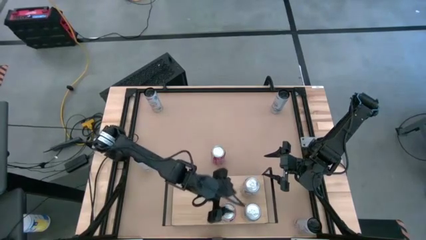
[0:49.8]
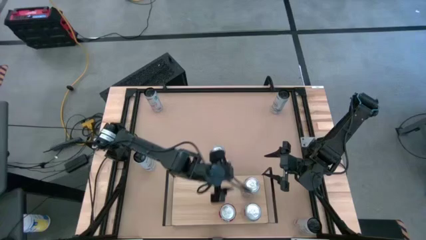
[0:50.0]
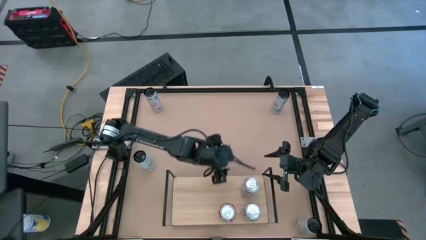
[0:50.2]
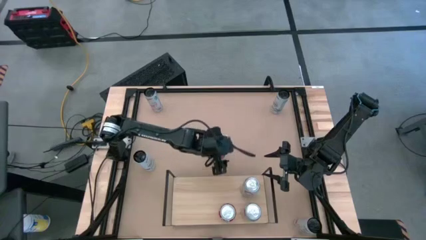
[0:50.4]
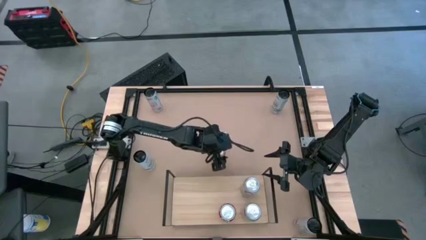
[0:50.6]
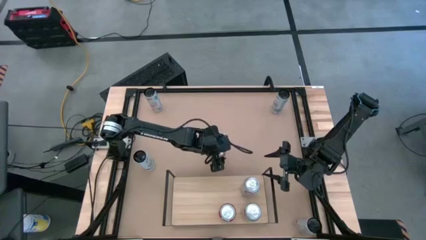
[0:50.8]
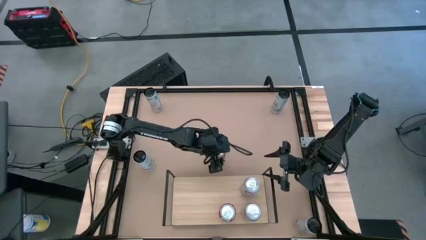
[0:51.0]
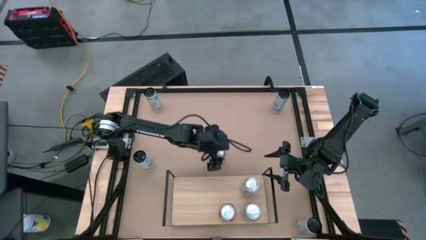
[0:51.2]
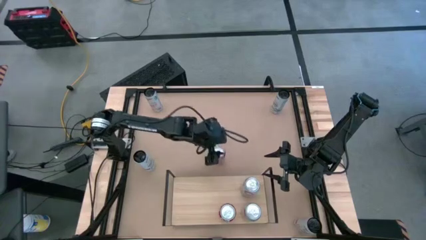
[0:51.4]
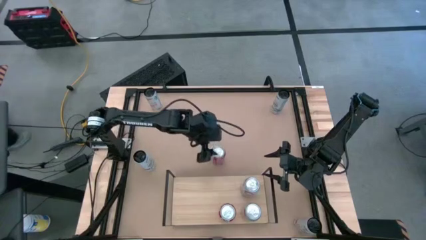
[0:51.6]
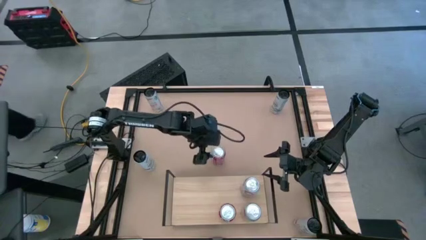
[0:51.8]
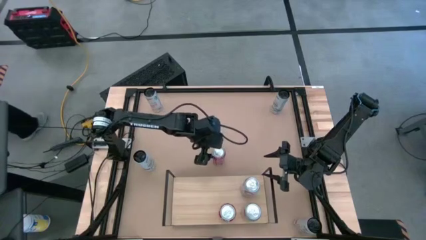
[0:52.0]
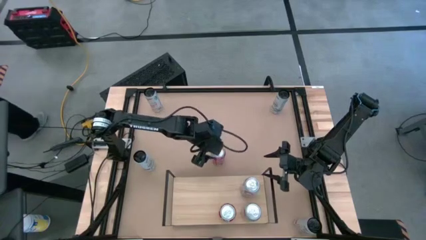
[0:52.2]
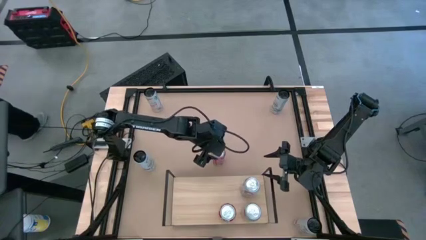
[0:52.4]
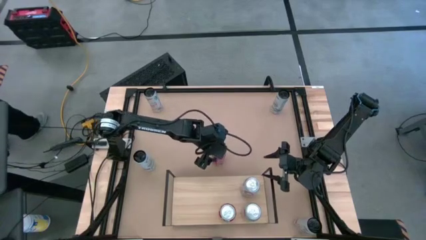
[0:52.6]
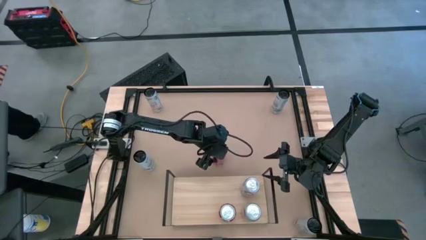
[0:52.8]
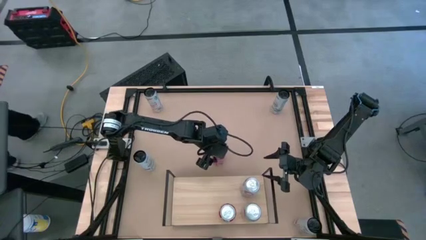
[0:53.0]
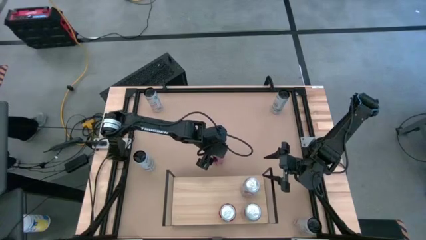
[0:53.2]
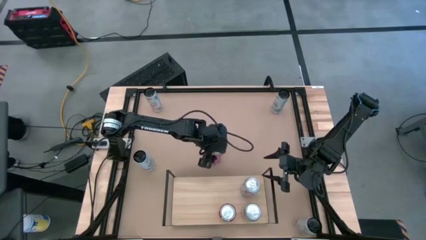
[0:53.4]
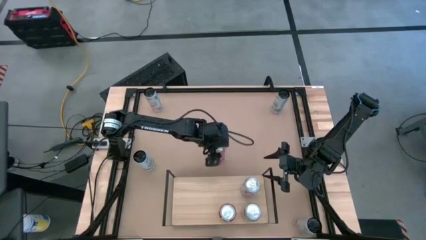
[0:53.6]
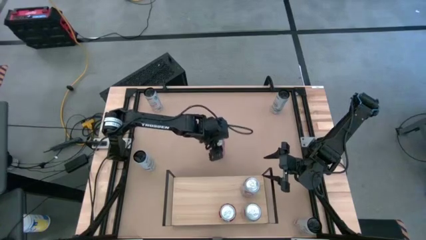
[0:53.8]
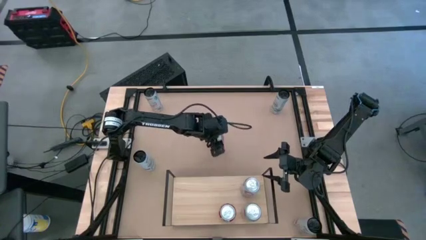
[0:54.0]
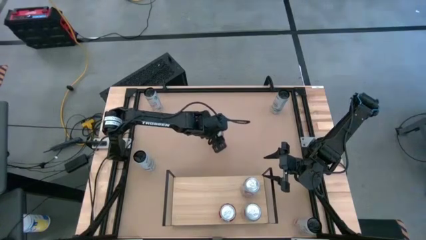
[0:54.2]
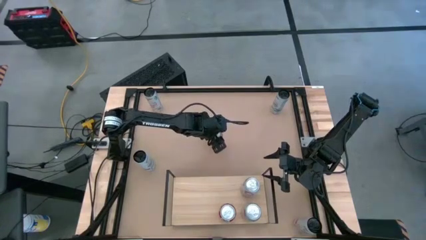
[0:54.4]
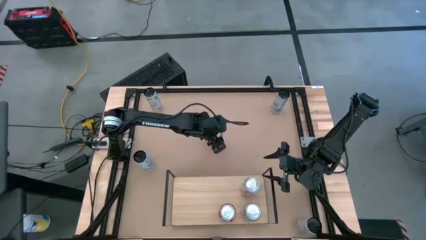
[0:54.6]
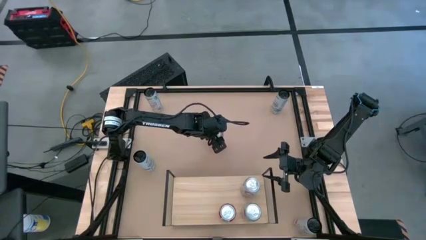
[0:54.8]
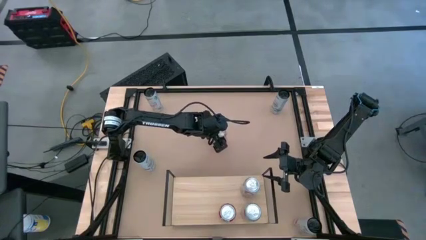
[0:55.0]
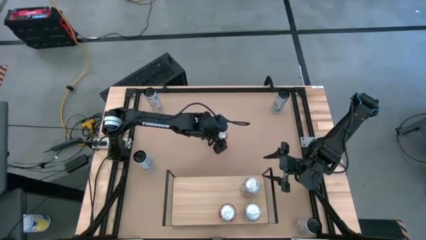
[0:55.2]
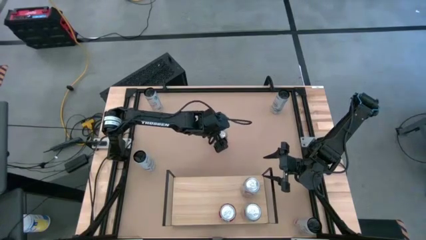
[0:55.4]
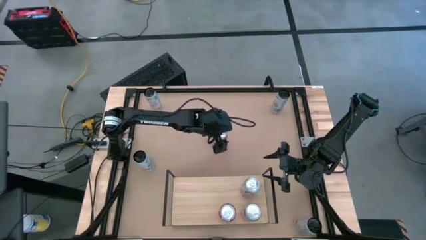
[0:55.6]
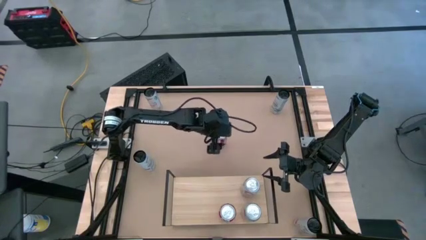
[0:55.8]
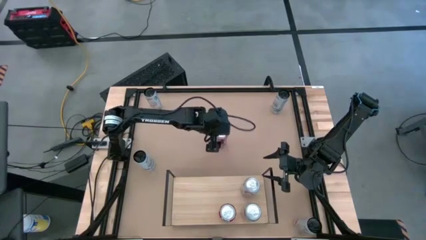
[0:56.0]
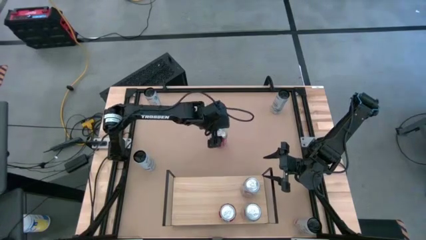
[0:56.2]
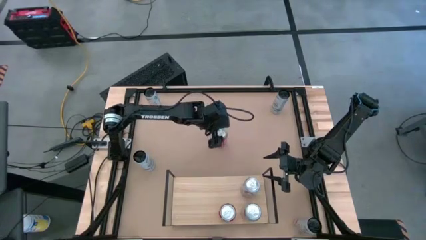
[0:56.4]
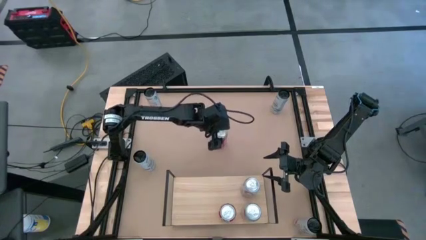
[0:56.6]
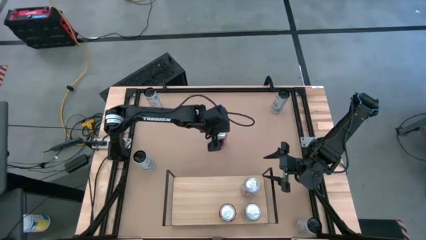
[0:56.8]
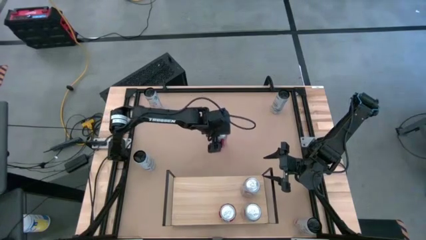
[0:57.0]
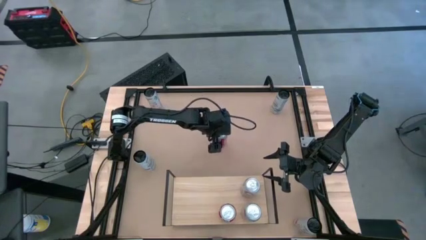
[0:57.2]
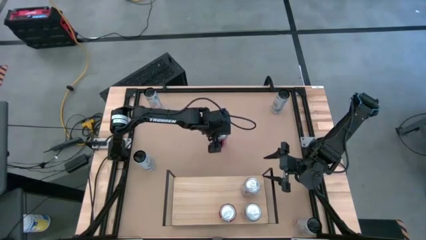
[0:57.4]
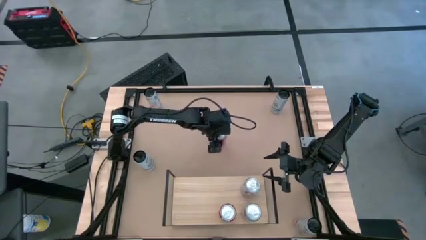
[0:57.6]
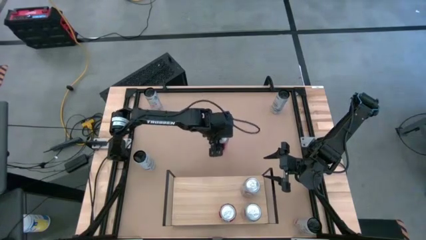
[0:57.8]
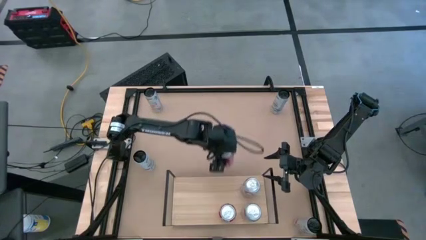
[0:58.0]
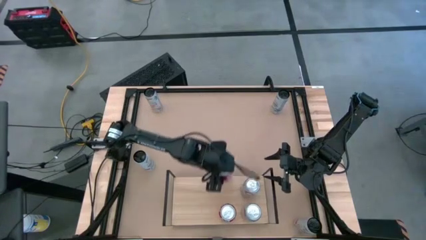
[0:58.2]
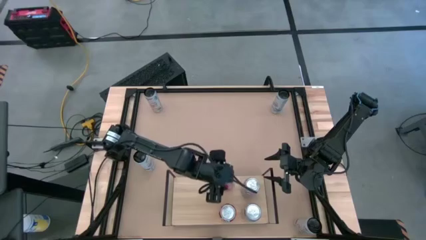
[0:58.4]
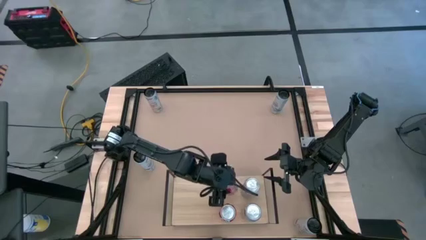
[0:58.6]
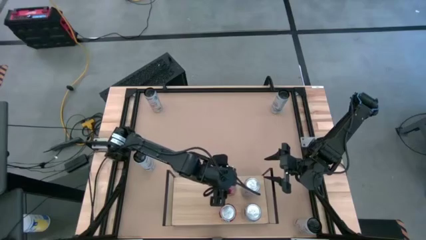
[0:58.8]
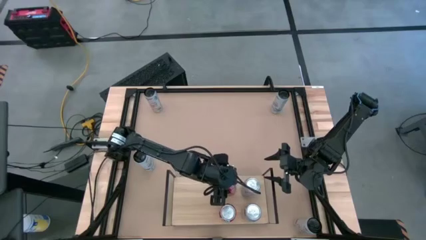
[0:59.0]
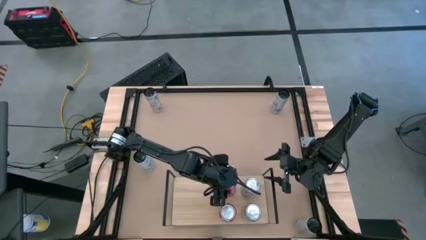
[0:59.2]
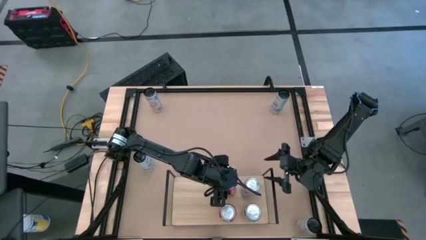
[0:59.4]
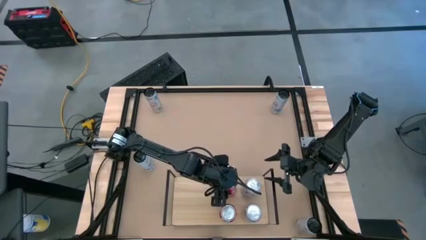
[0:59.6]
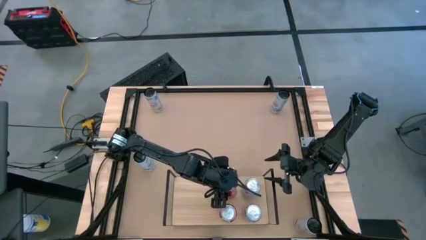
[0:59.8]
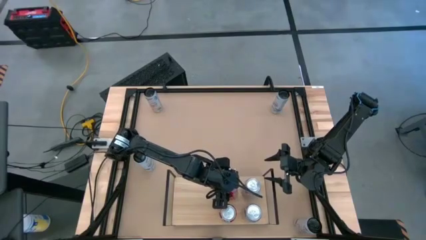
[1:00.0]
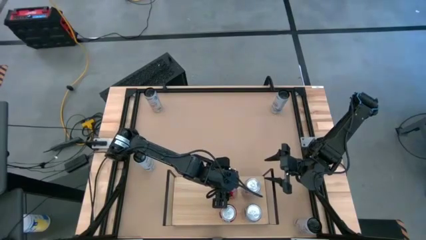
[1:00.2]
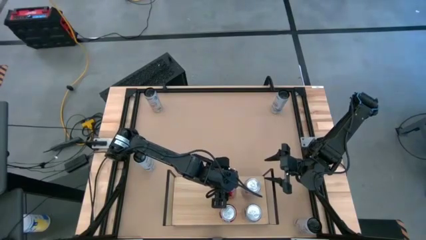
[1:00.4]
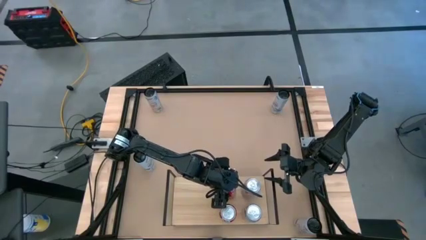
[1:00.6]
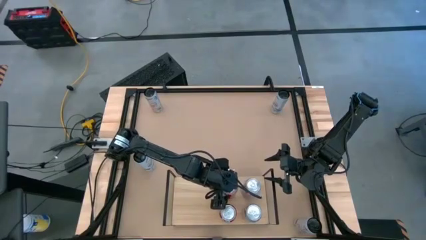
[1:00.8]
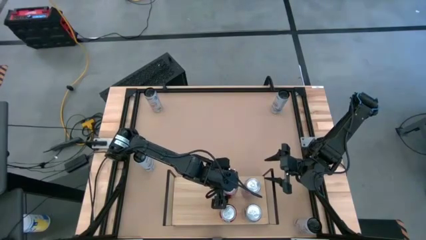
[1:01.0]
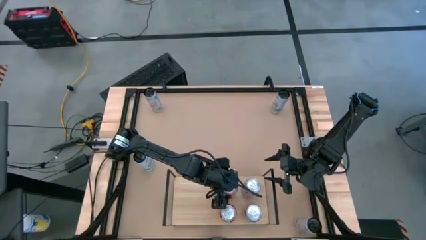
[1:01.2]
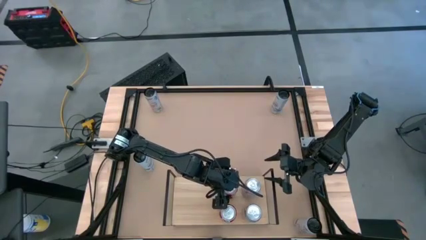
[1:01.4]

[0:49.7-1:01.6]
Task: Place canned beverage on shelf
Put the red soda can aligned with the other red soda can on the shelf

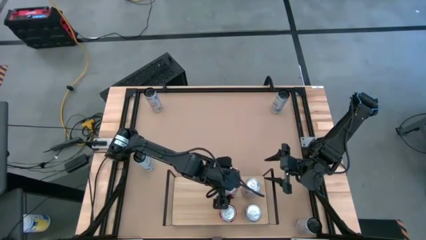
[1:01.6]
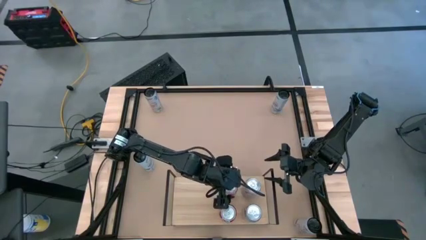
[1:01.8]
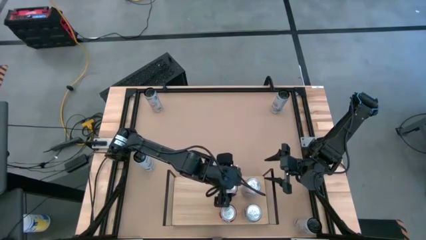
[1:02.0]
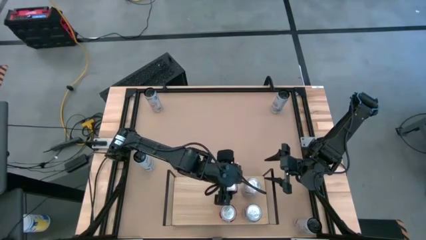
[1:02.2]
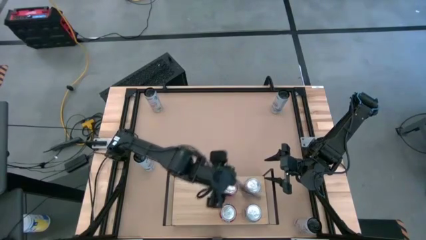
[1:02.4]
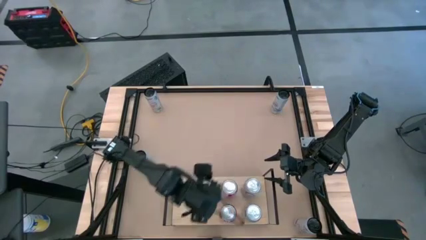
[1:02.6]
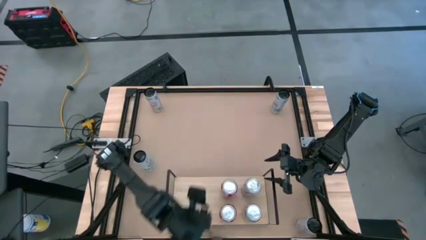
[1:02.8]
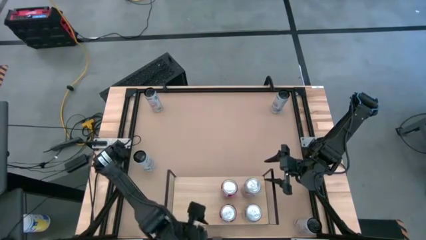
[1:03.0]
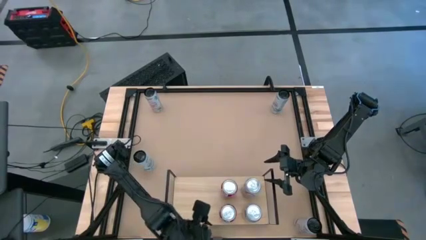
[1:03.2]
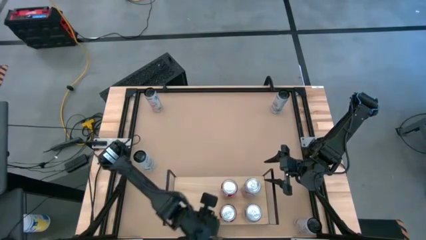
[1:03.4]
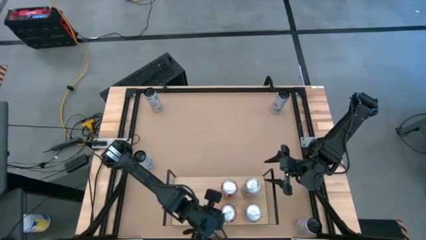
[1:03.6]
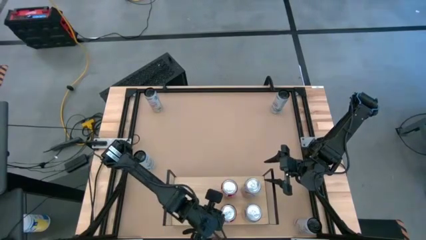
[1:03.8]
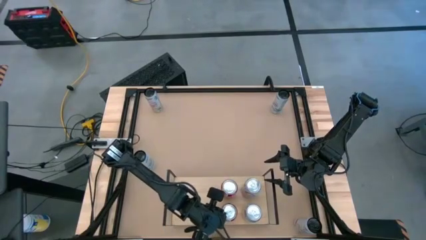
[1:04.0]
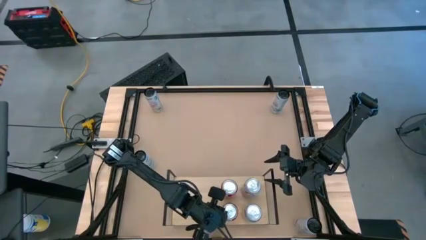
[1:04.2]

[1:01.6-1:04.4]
Adjust the red soda can on the shelf
